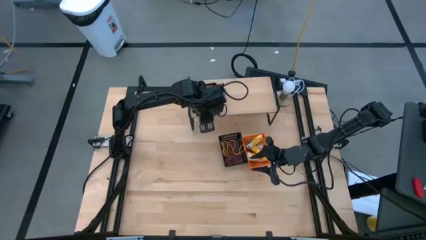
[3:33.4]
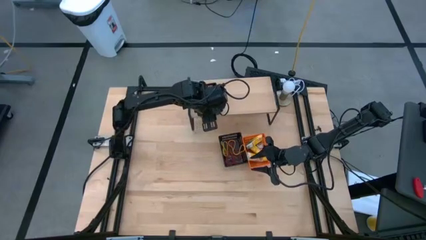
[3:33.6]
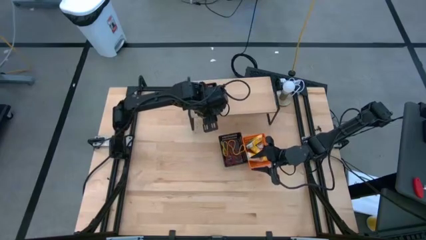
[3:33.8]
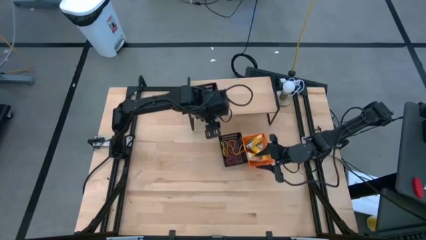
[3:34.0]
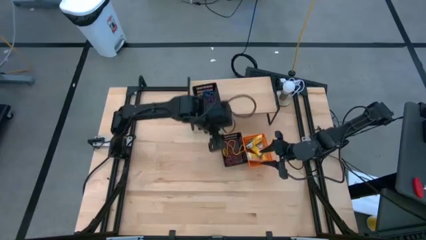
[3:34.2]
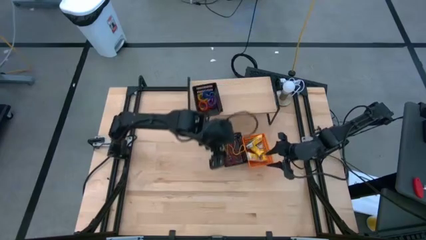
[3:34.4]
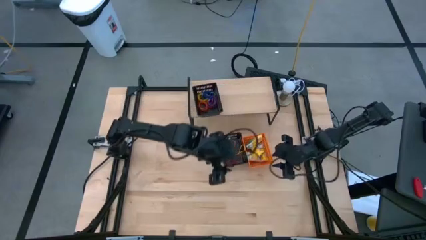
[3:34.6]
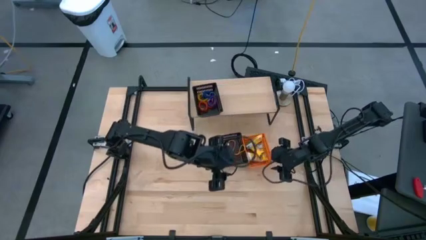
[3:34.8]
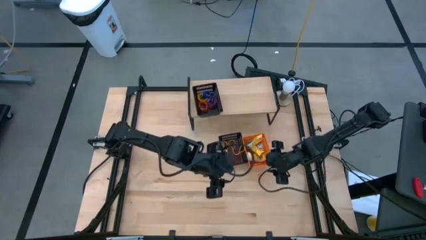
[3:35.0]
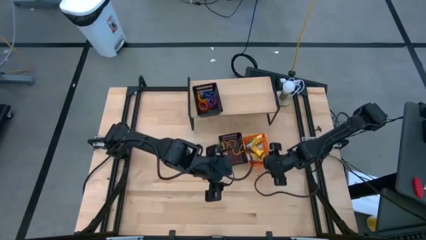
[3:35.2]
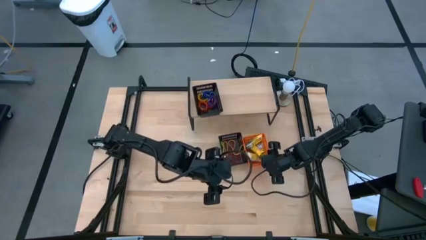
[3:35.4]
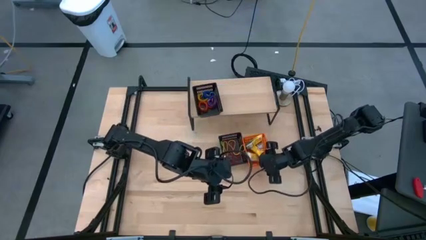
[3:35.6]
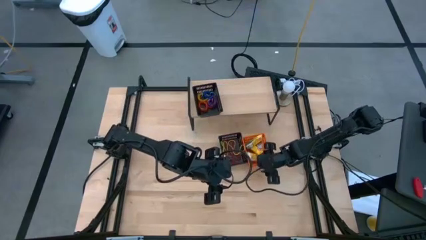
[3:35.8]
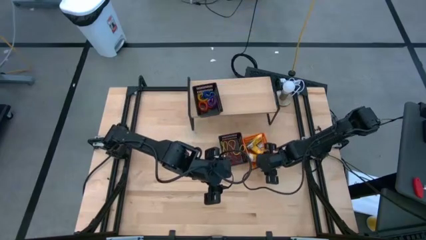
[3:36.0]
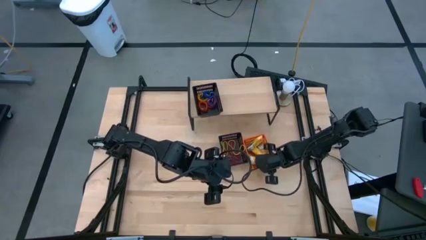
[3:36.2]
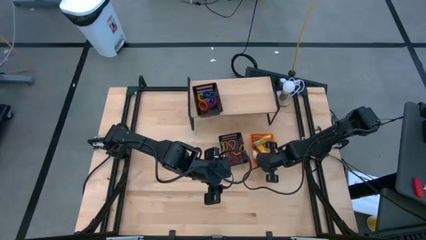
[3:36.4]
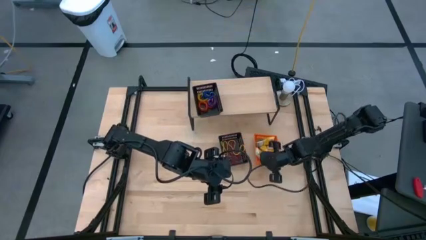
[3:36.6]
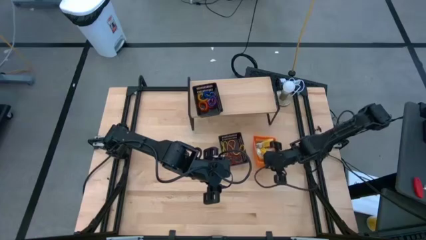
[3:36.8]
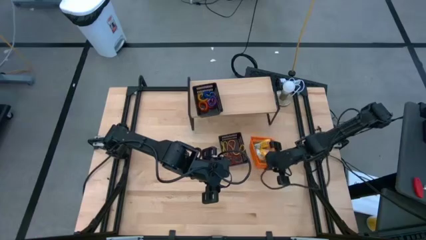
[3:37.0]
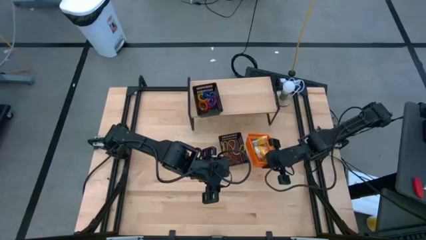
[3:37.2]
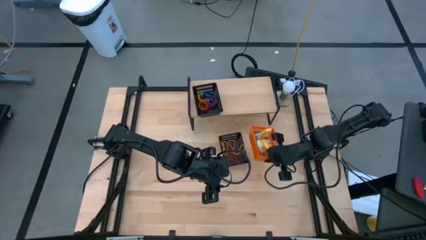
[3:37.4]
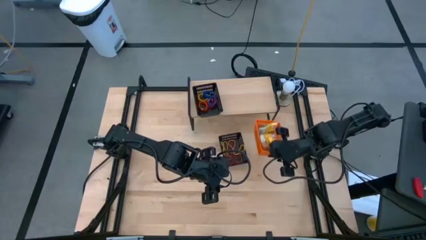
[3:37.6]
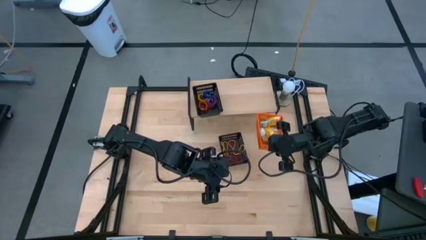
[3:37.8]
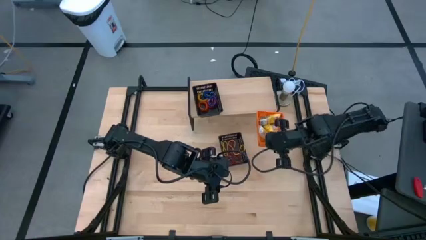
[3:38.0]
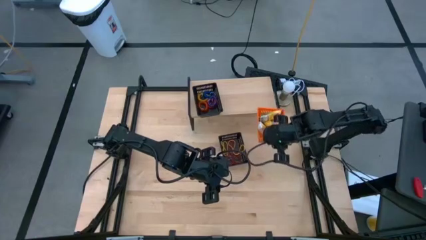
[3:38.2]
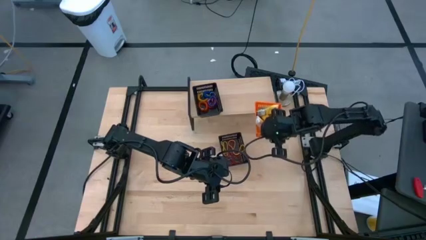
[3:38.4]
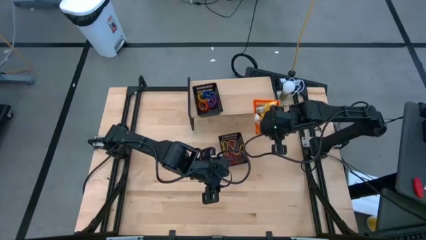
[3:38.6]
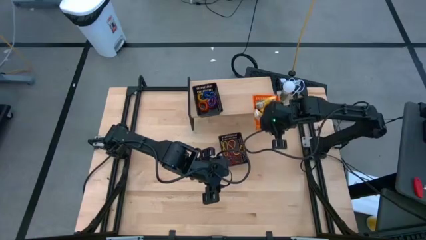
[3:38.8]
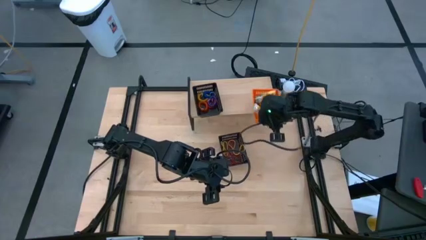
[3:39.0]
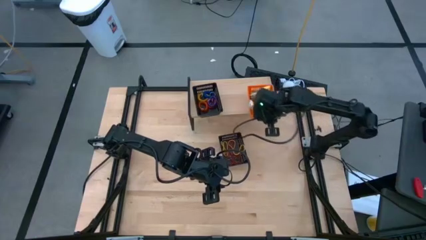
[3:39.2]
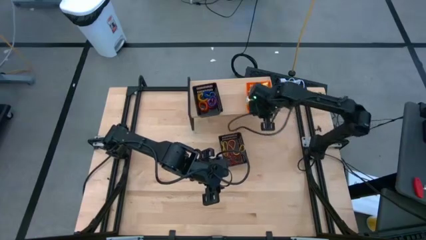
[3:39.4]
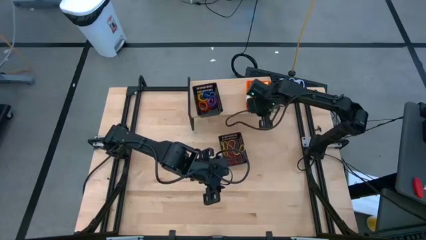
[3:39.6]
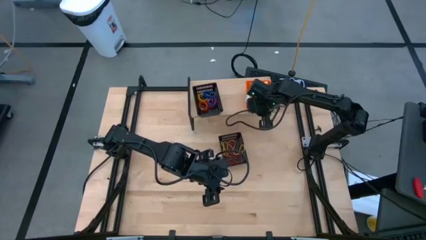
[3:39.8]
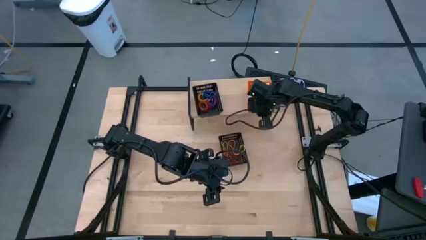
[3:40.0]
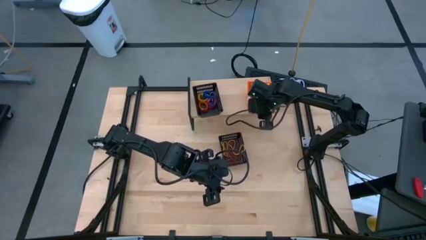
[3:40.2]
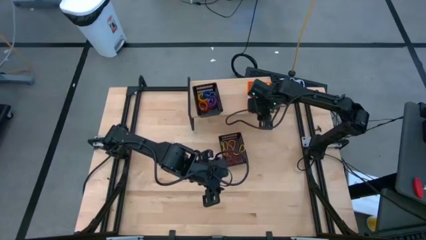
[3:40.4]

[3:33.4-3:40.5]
Task: Pick & Place Office Desk Supplies
Put the orange bin with crayon bag on the shelf

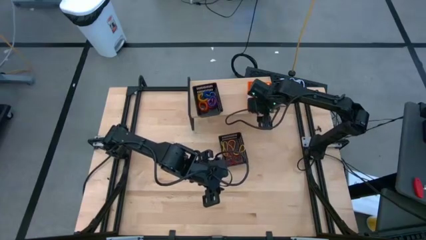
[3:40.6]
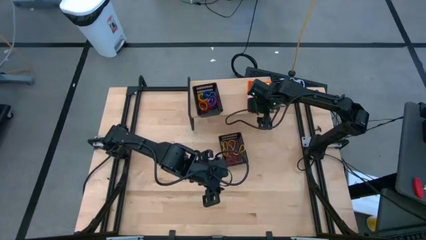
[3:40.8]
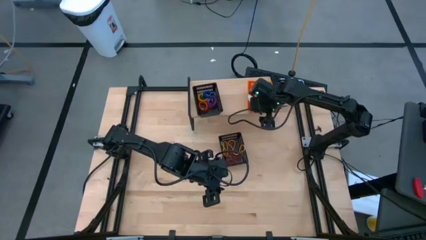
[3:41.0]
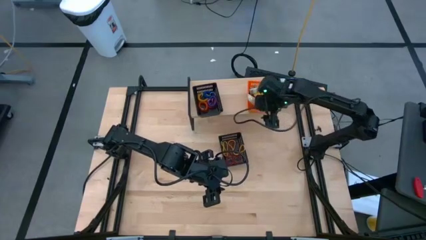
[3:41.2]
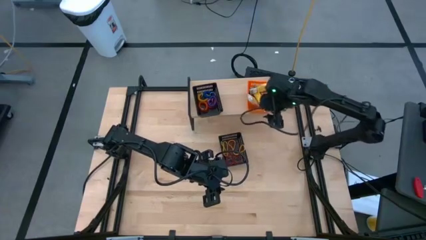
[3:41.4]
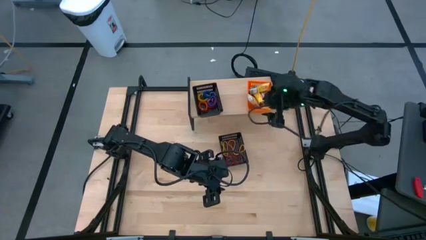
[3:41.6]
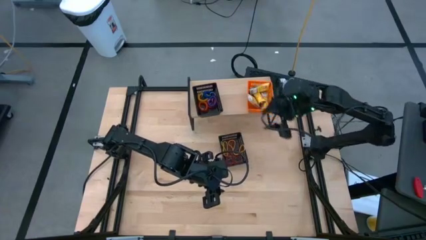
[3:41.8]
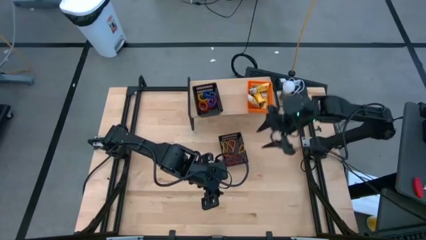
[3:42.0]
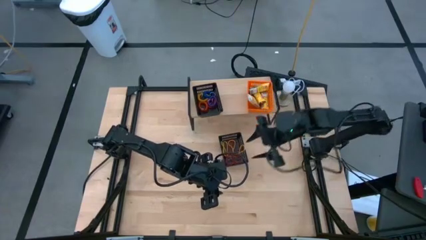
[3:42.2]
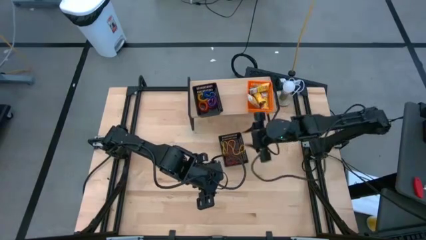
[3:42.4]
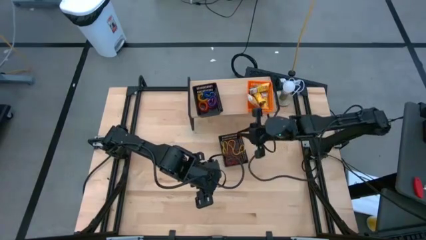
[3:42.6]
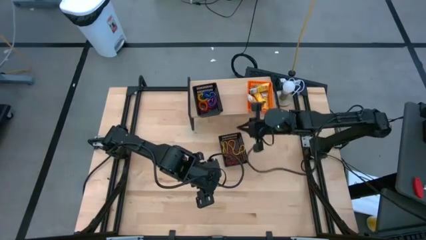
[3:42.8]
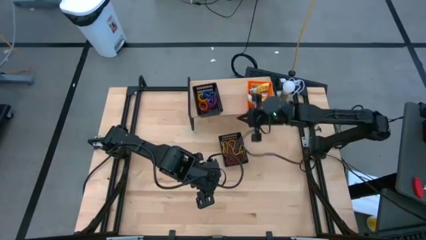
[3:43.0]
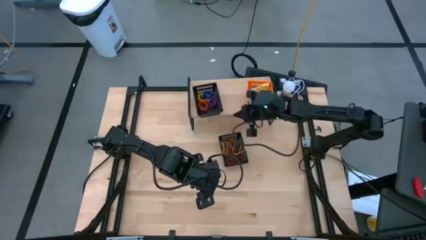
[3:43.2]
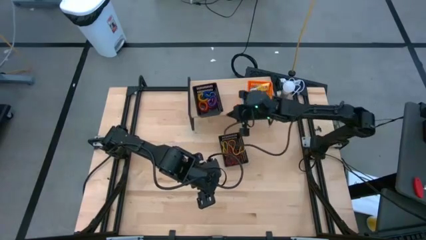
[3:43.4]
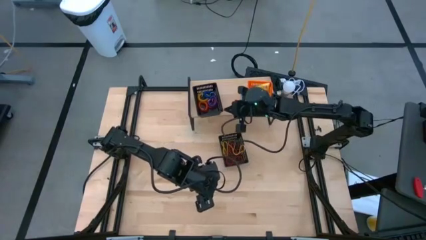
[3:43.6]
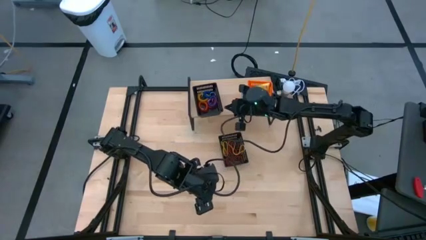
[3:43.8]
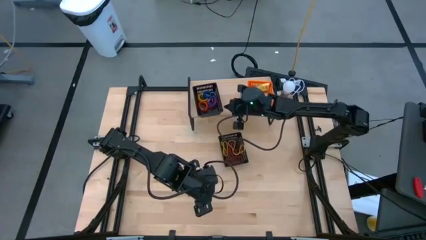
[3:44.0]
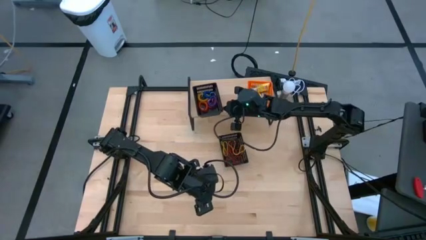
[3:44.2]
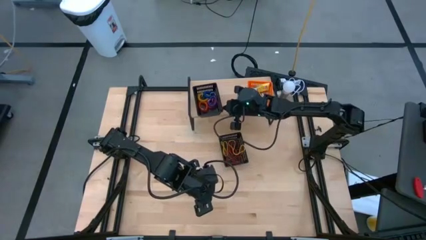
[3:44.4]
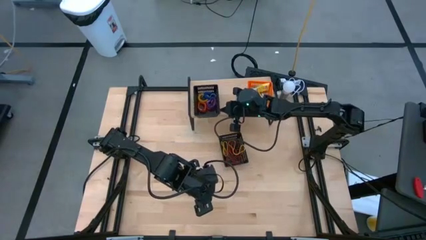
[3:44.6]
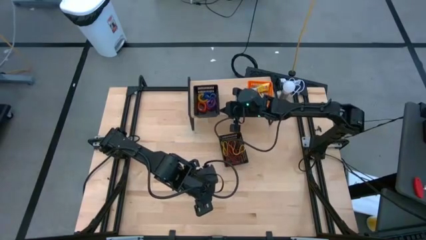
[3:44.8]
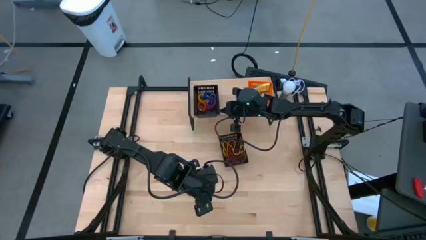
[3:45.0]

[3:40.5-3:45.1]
Adjust the black bin on the shelf

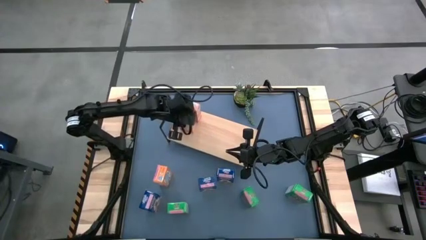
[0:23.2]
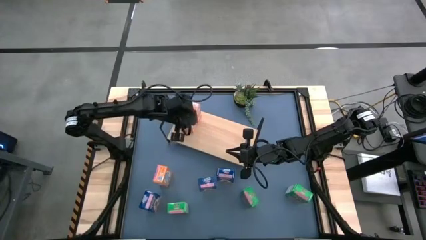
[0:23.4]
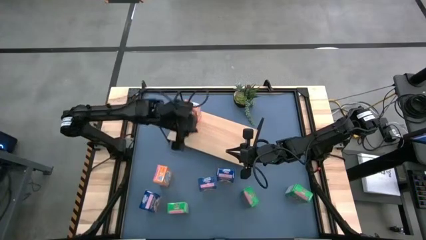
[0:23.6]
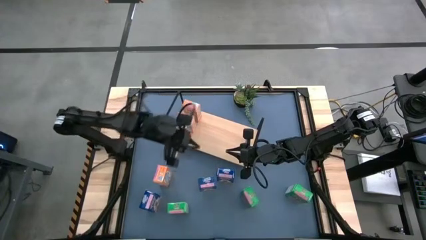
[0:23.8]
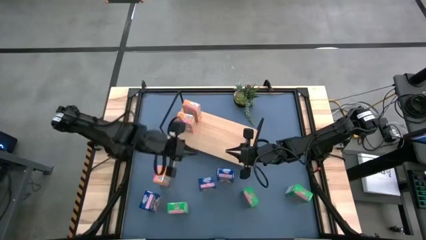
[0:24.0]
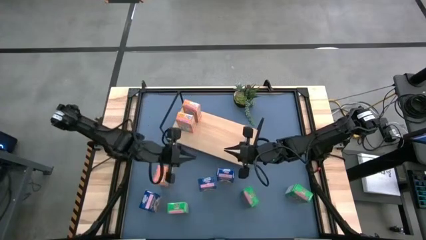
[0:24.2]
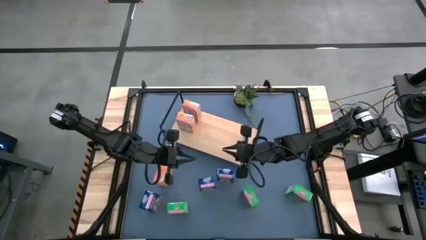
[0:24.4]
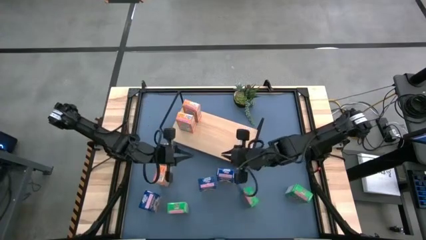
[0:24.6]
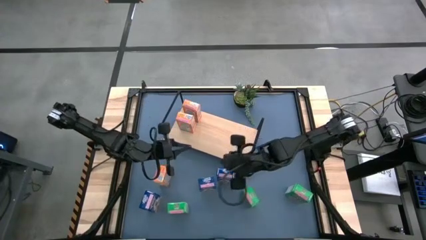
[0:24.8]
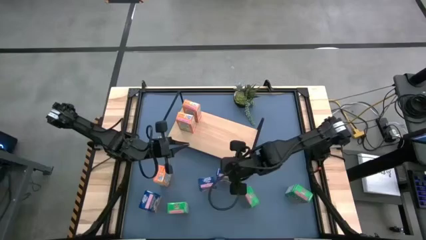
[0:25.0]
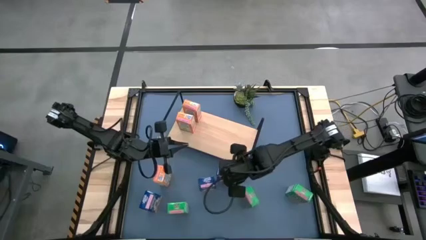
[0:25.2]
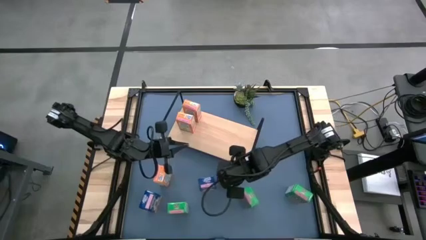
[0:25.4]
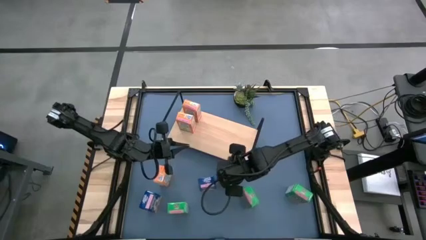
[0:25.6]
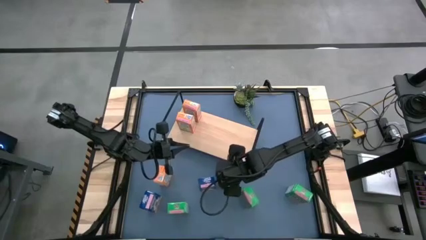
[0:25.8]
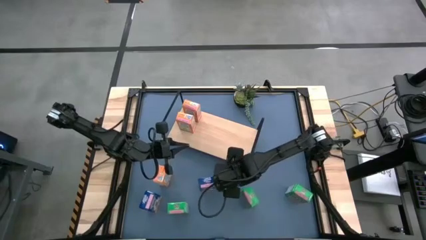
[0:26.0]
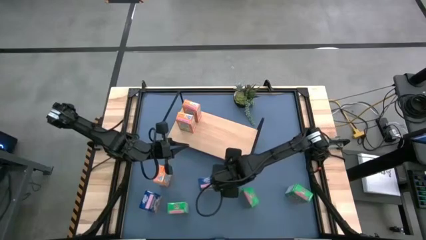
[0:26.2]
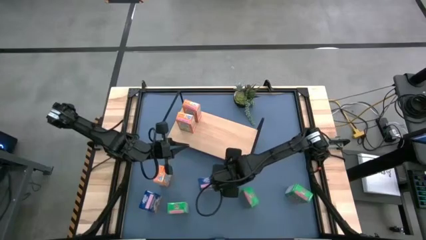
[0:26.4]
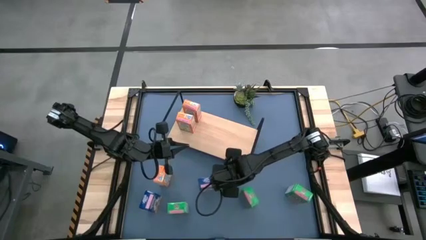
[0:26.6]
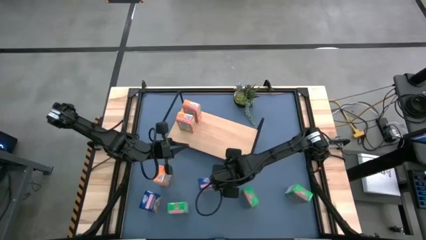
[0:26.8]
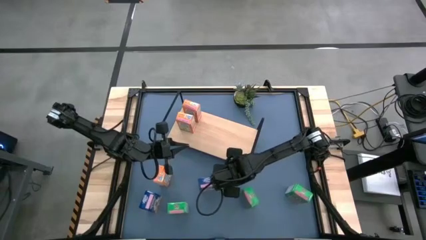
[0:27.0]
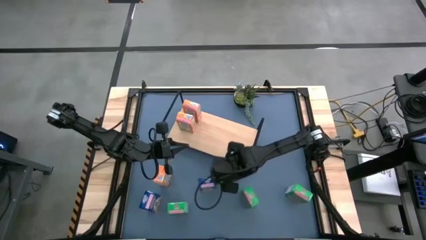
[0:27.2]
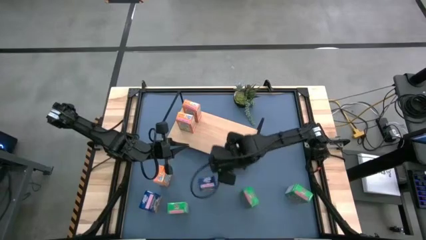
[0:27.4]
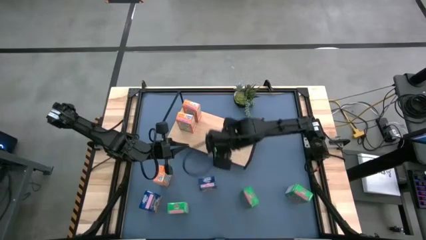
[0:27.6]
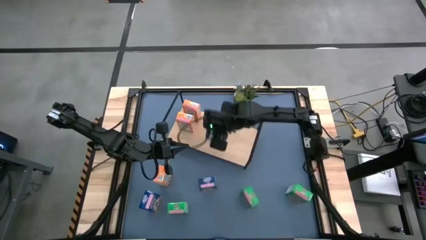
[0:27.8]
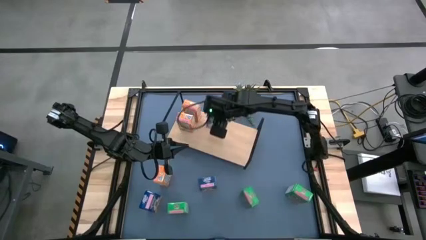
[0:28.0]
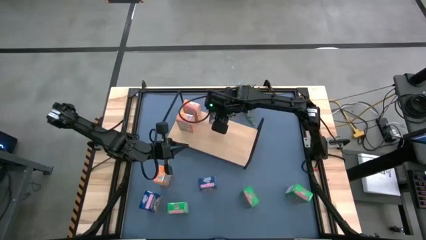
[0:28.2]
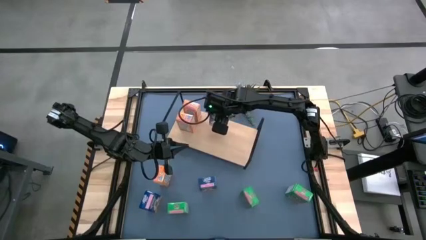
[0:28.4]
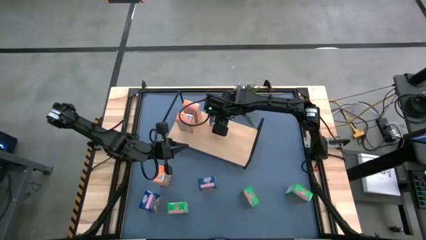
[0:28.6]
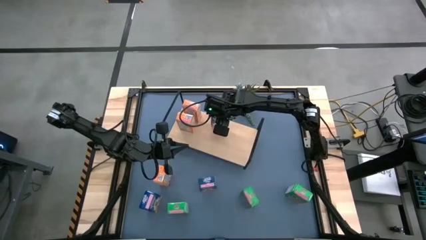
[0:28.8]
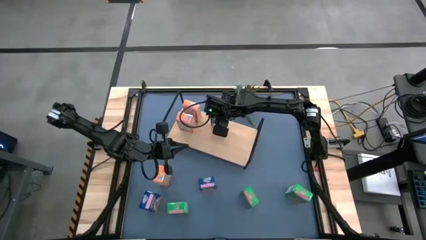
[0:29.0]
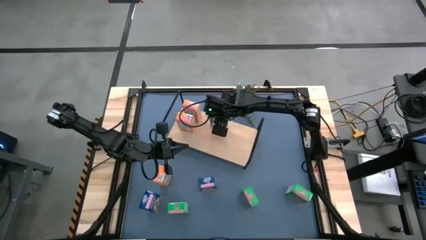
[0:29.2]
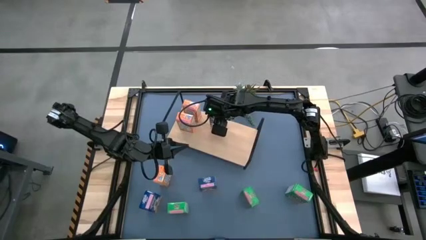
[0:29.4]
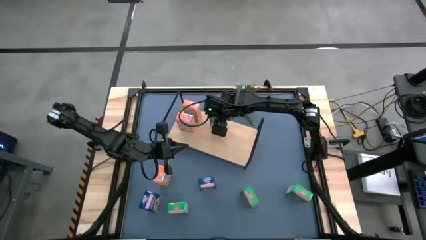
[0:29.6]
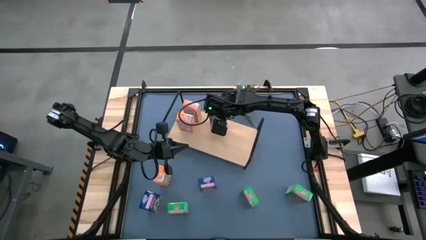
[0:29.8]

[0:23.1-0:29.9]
Task: Stack cereal on shelf
Put the right blue cereal box on the shelf
